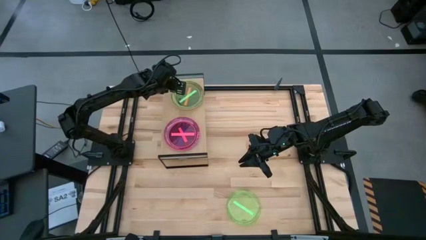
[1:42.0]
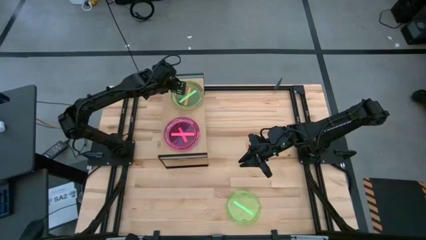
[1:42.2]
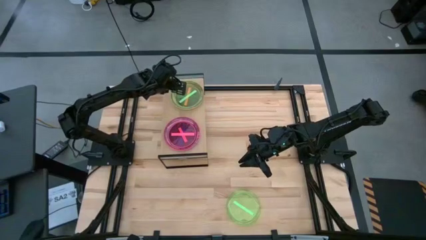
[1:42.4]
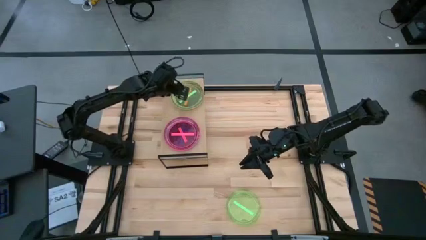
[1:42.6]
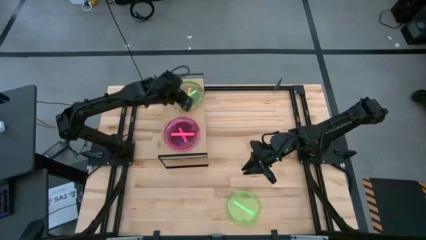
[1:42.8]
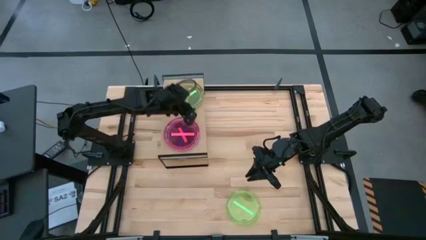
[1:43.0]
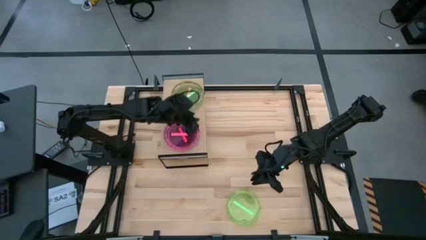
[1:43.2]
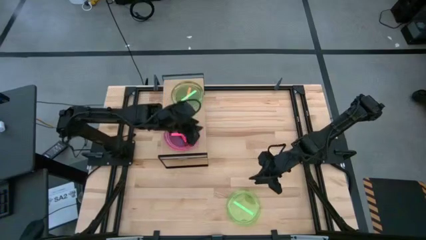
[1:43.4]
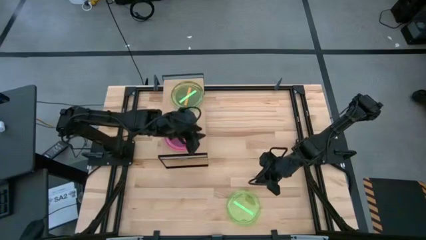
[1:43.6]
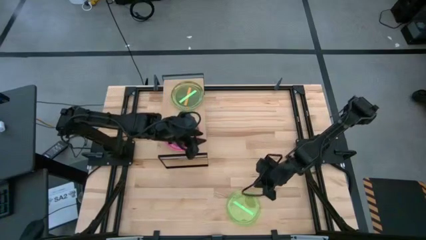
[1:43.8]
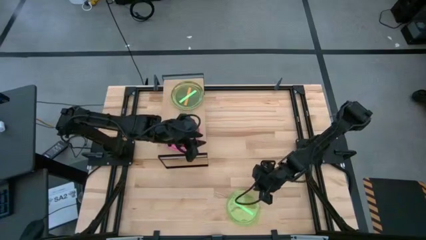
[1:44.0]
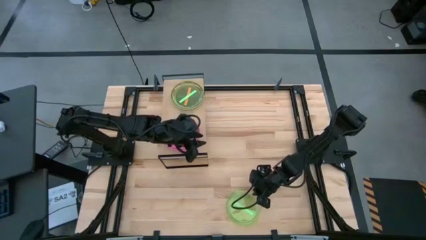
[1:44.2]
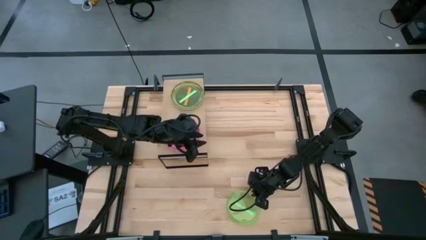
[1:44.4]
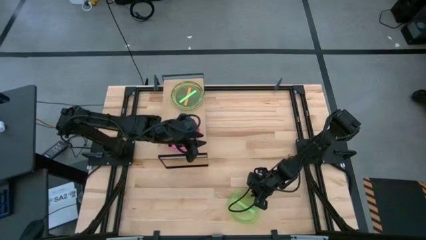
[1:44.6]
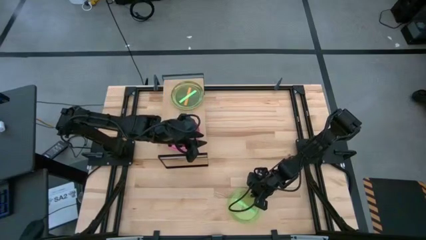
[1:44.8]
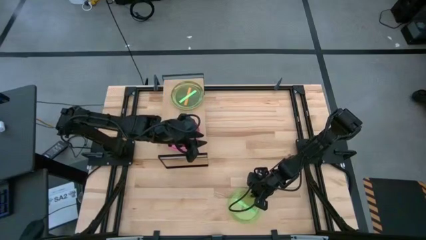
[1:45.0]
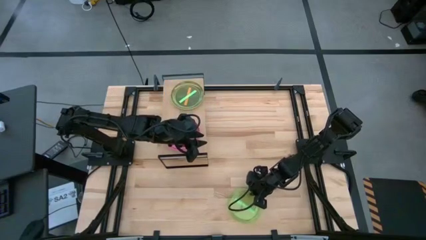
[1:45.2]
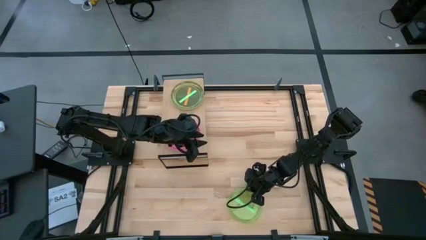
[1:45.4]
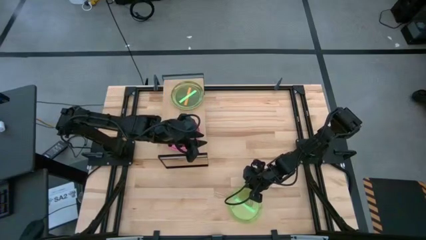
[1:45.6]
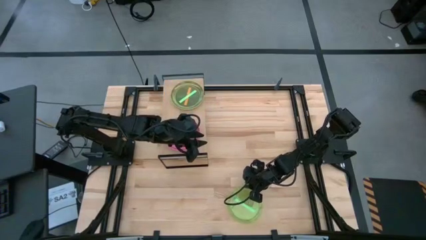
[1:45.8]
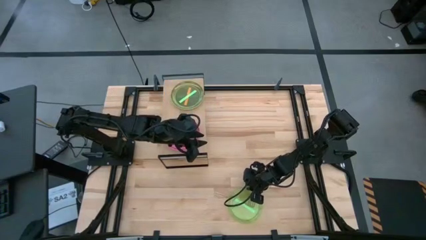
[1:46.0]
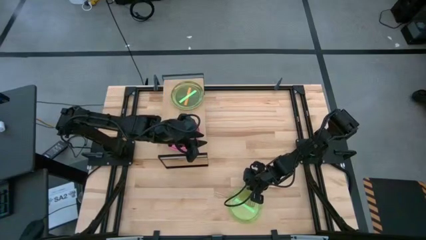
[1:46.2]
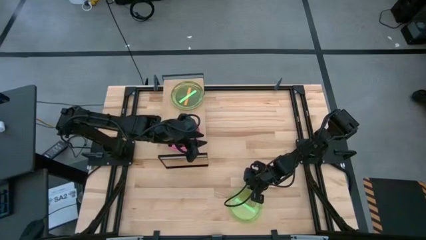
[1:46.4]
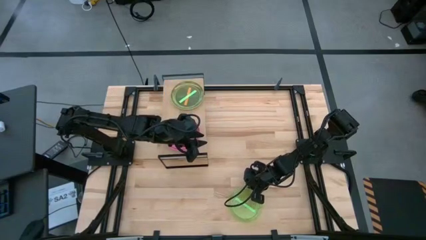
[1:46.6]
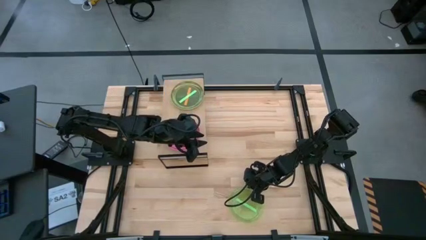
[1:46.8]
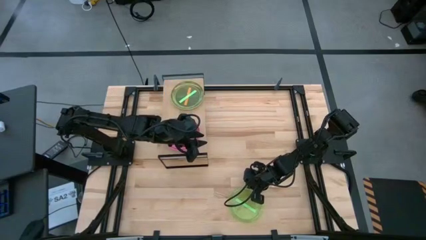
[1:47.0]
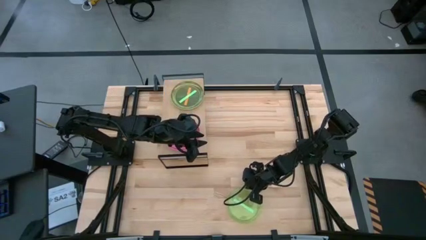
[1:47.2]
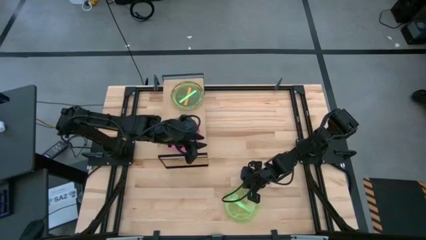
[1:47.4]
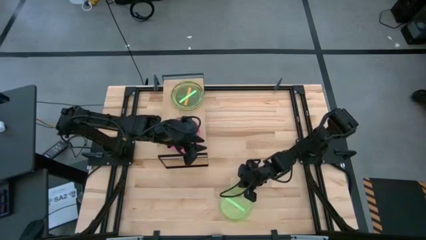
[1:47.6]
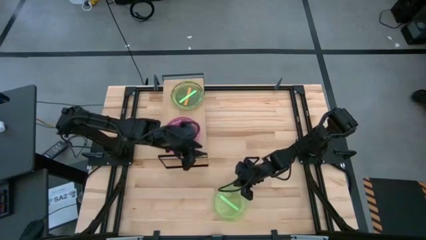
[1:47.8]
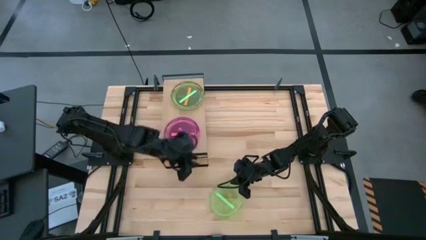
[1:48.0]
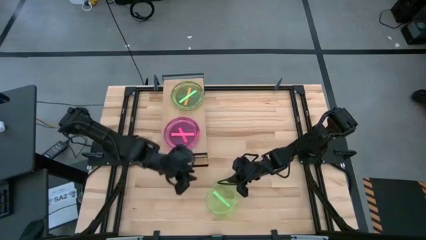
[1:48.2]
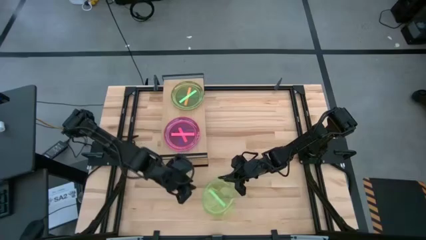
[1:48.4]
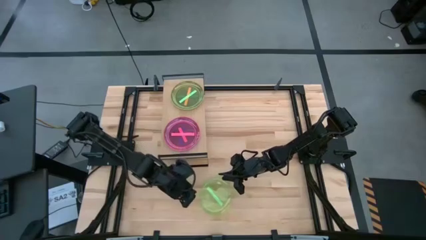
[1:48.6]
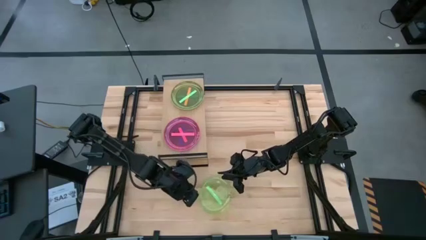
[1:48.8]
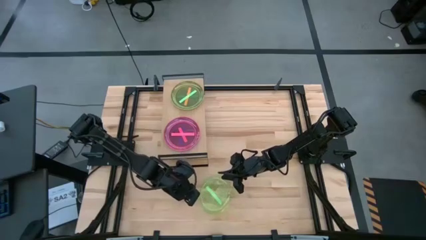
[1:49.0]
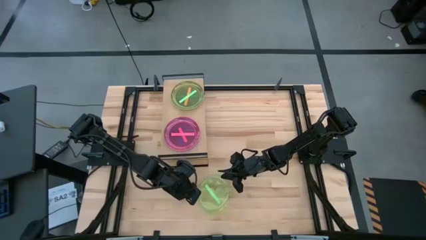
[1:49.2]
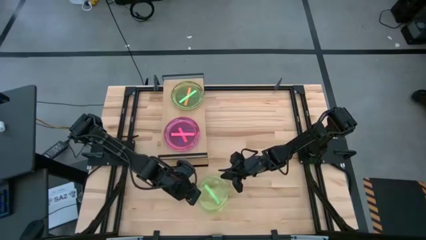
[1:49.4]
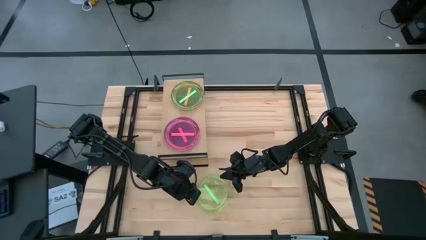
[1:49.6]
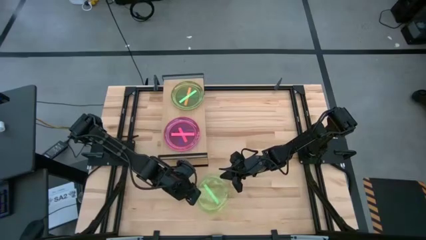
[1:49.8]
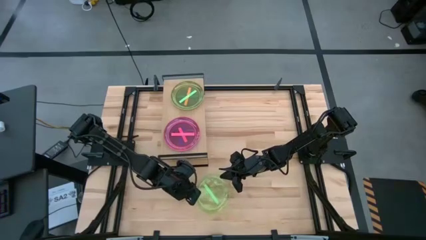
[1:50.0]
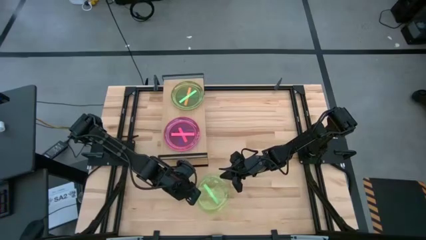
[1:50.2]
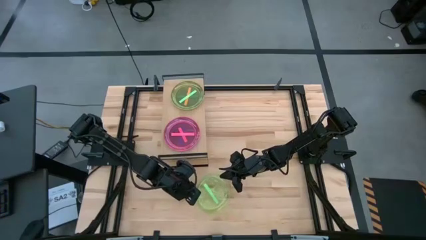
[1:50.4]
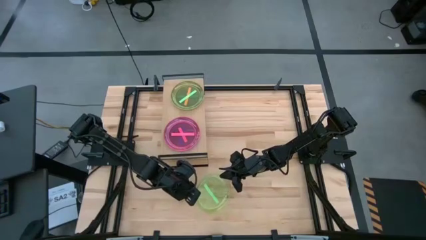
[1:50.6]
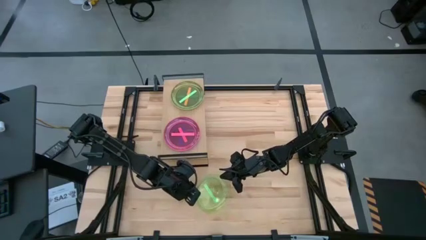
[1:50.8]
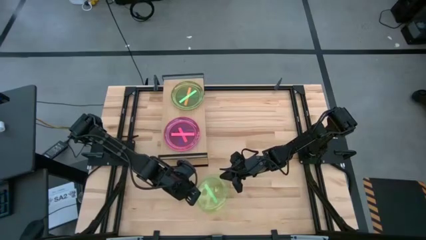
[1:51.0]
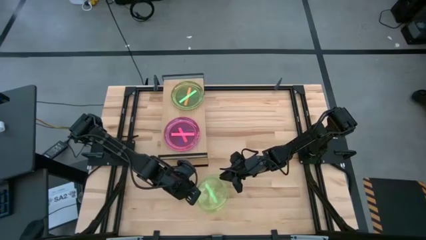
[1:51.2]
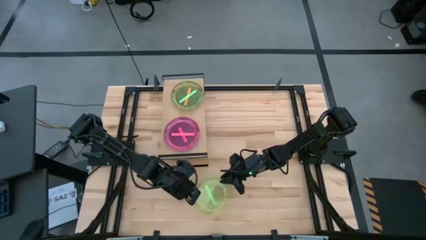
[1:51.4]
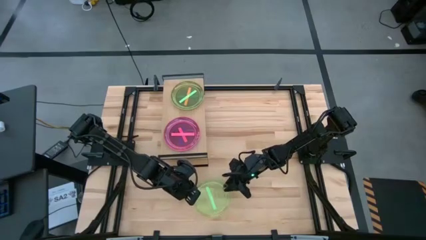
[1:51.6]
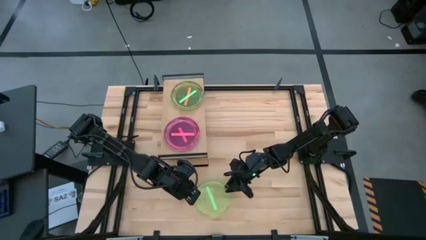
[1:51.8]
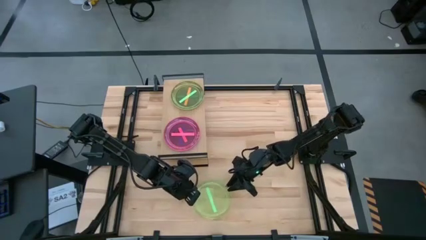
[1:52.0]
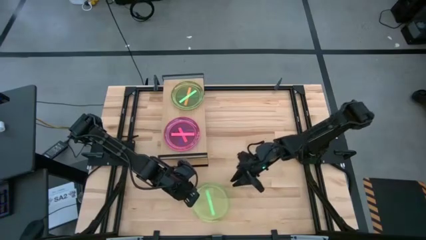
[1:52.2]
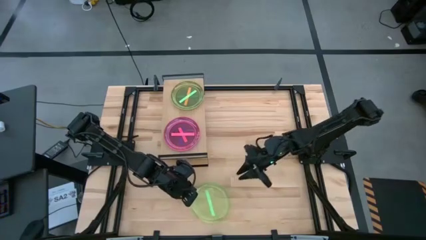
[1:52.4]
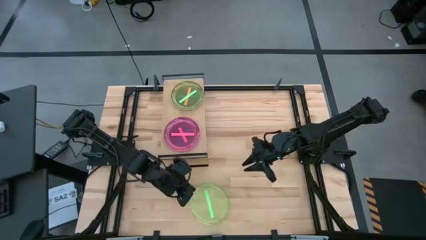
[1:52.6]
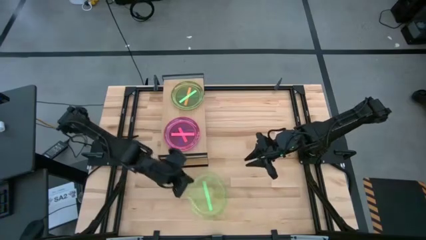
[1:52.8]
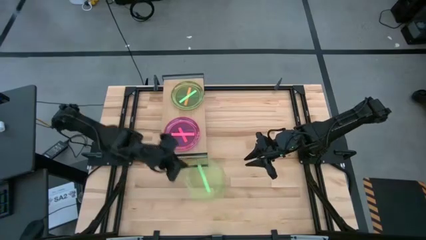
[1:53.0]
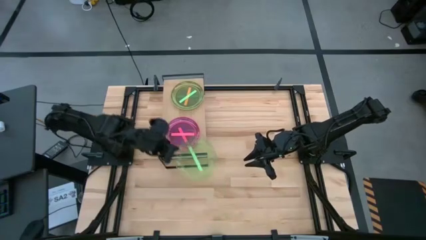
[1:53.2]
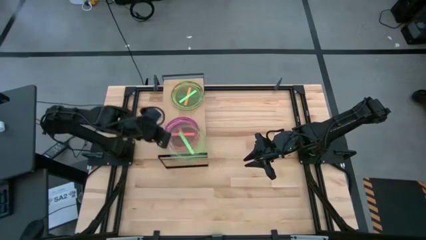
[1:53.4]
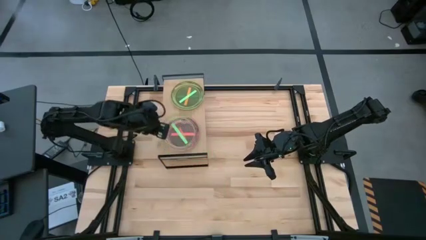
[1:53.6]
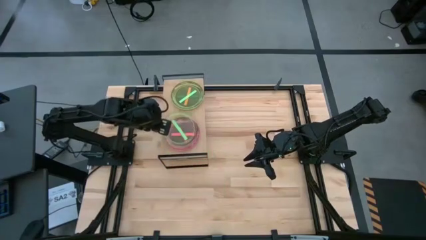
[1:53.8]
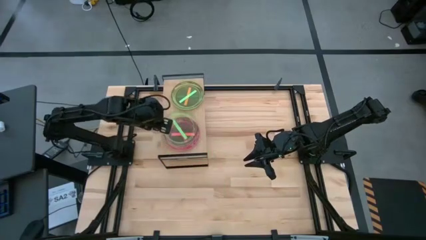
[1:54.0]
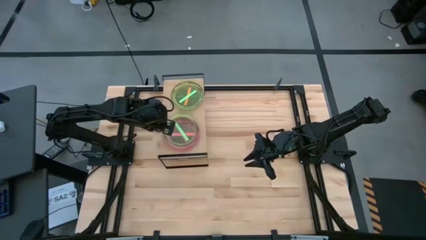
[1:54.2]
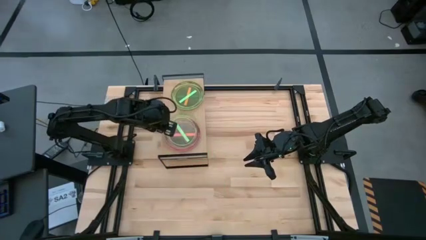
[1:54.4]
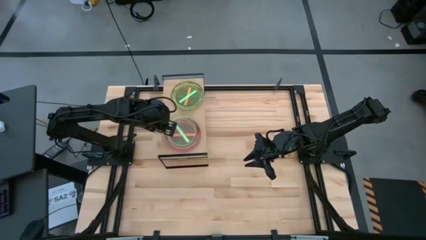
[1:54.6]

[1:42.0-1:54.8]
Task: Place and stack plates onto a shelf
Stack the green plate on top of the pink plate on the shelf
